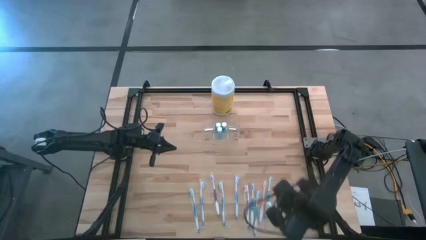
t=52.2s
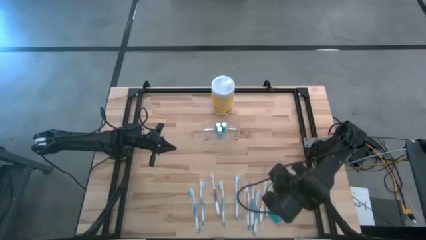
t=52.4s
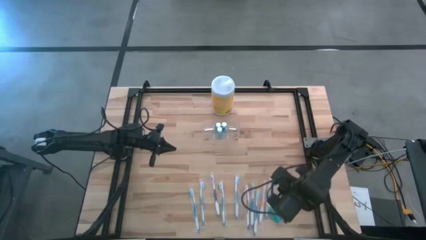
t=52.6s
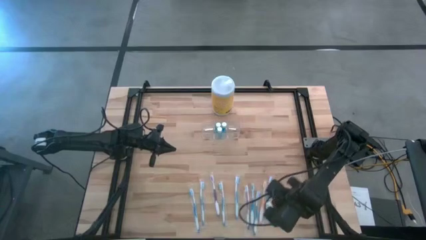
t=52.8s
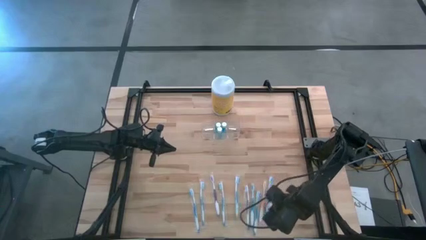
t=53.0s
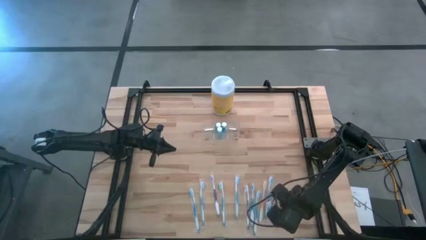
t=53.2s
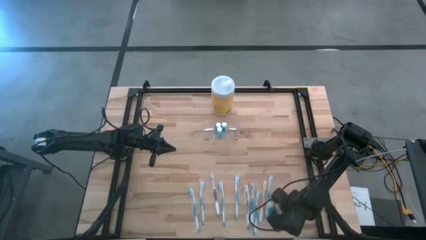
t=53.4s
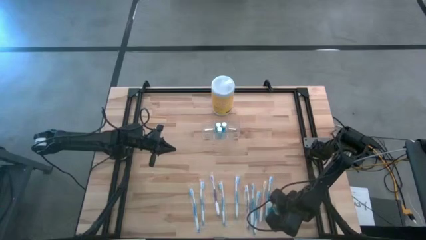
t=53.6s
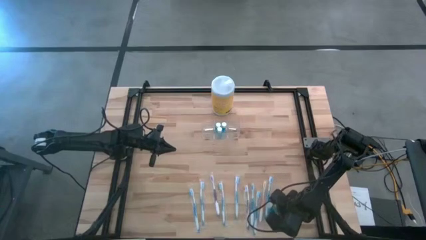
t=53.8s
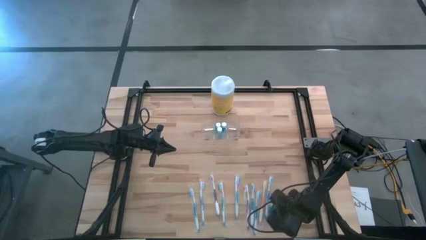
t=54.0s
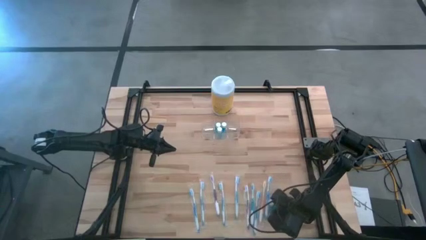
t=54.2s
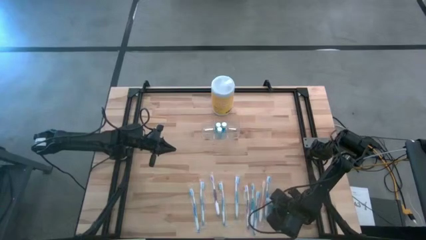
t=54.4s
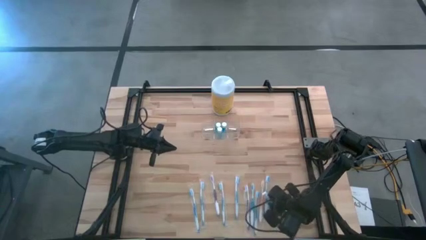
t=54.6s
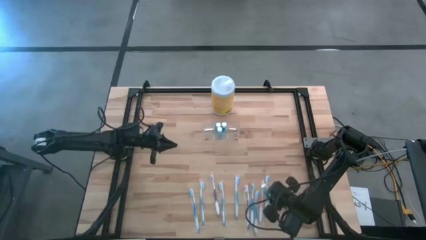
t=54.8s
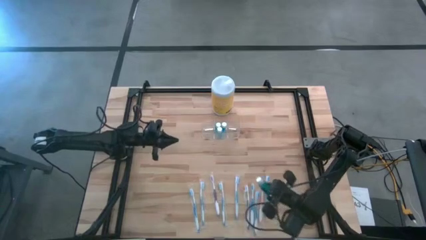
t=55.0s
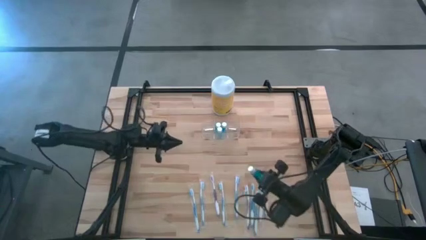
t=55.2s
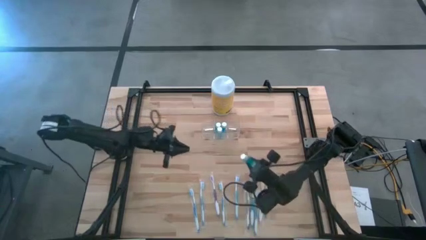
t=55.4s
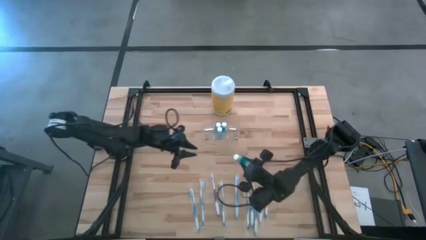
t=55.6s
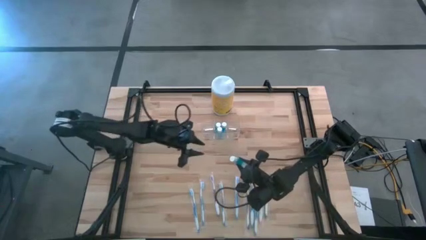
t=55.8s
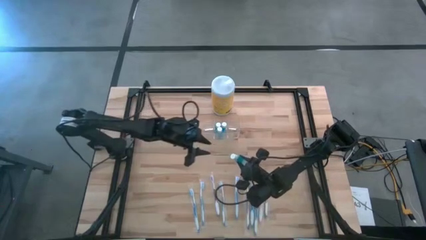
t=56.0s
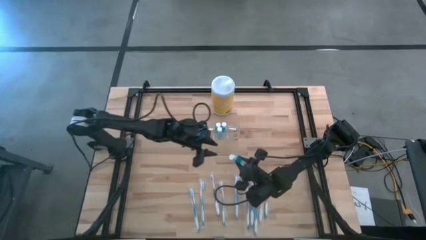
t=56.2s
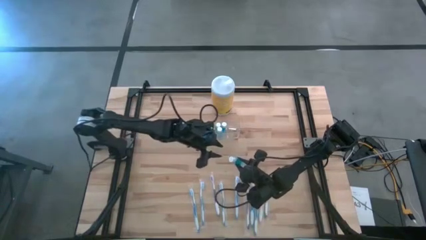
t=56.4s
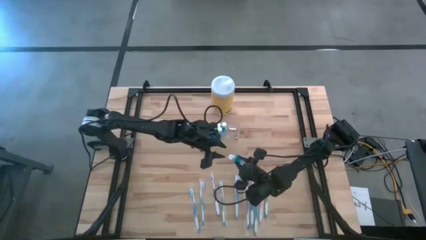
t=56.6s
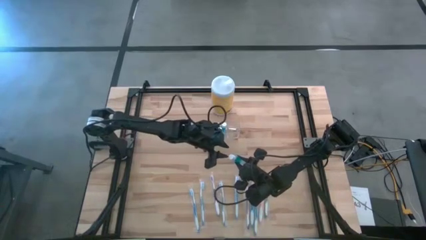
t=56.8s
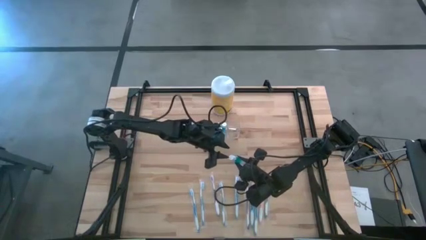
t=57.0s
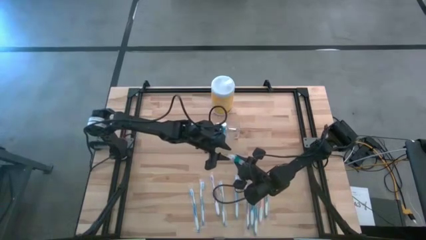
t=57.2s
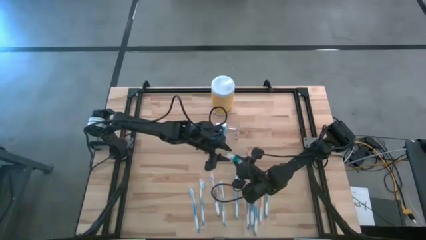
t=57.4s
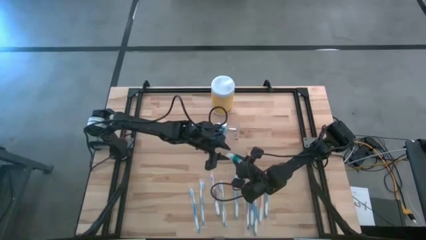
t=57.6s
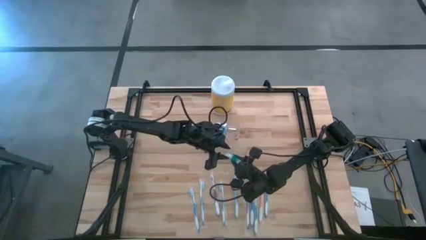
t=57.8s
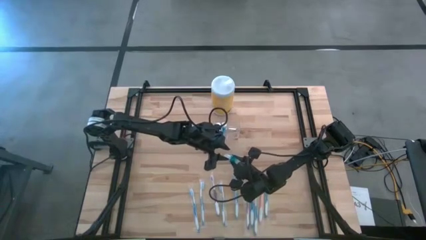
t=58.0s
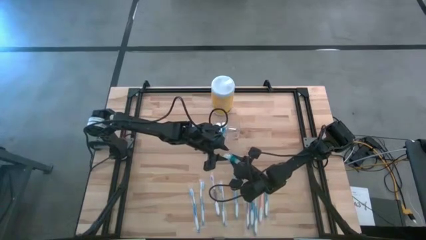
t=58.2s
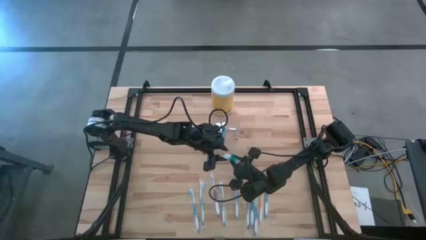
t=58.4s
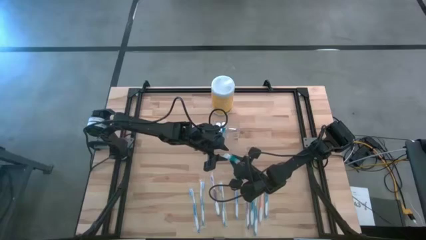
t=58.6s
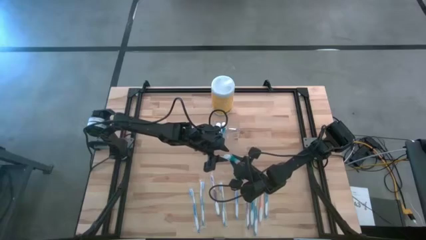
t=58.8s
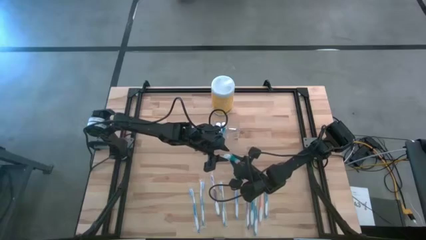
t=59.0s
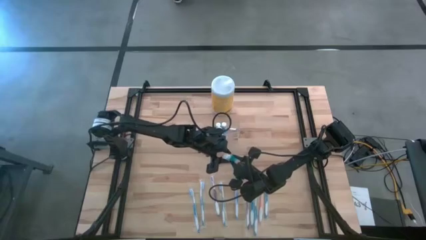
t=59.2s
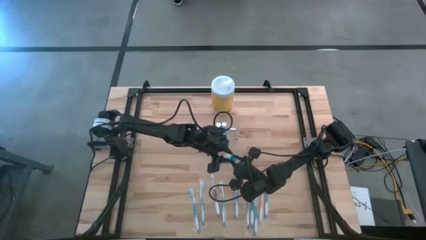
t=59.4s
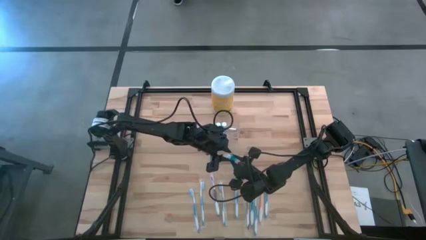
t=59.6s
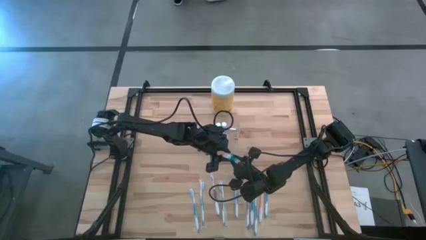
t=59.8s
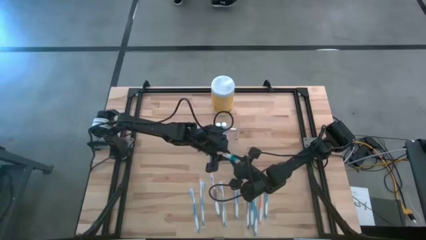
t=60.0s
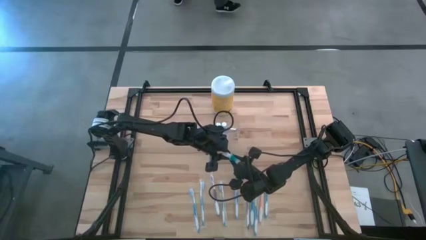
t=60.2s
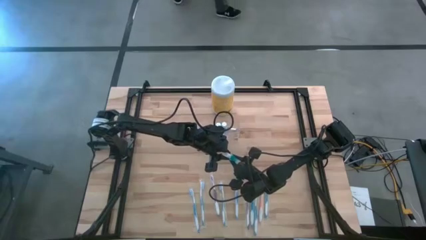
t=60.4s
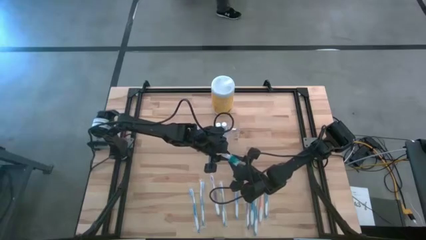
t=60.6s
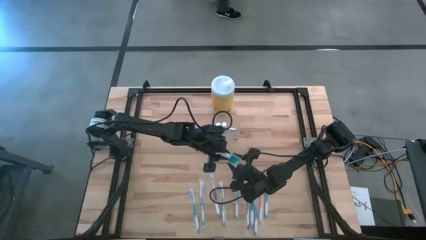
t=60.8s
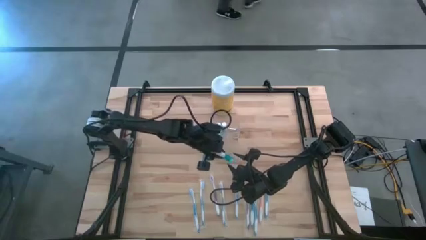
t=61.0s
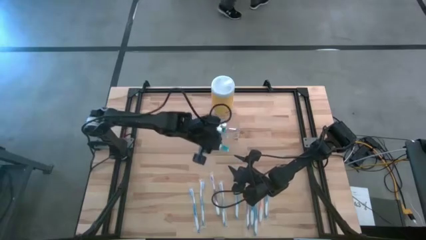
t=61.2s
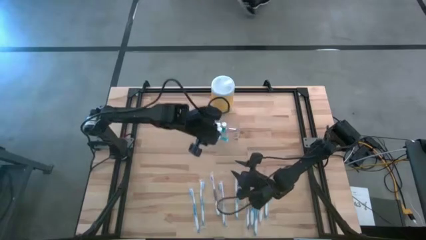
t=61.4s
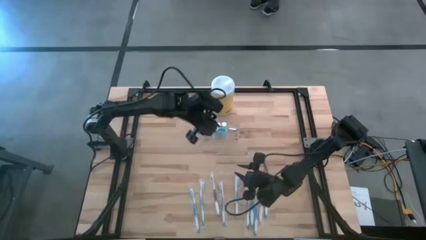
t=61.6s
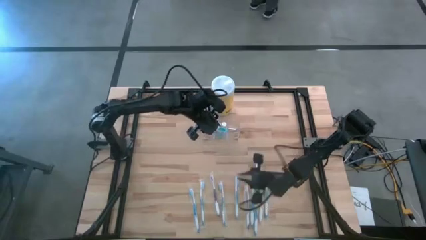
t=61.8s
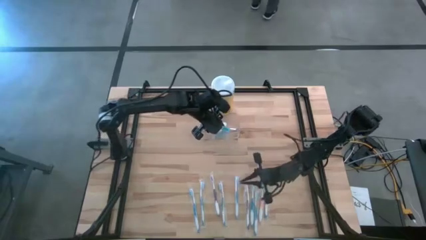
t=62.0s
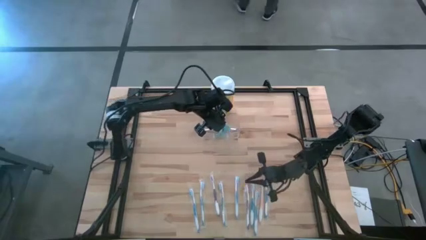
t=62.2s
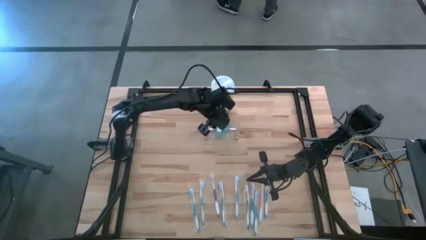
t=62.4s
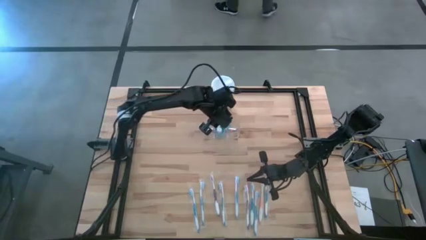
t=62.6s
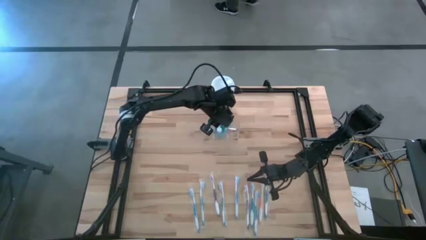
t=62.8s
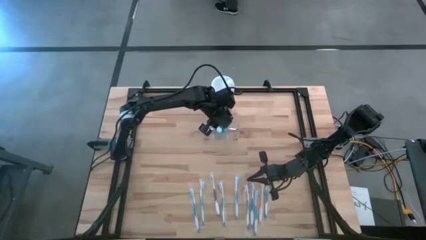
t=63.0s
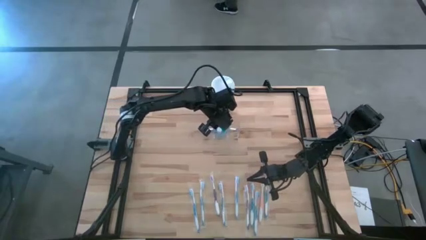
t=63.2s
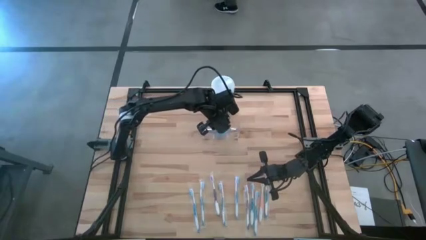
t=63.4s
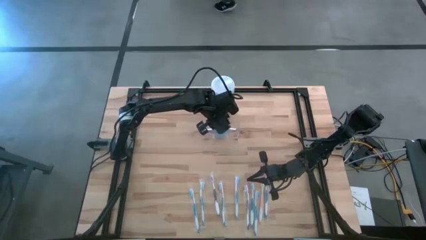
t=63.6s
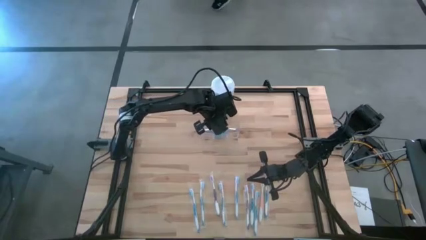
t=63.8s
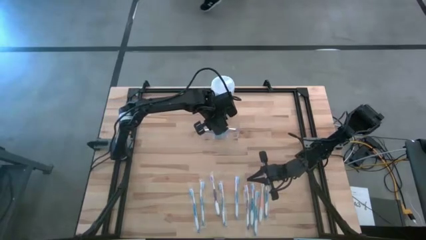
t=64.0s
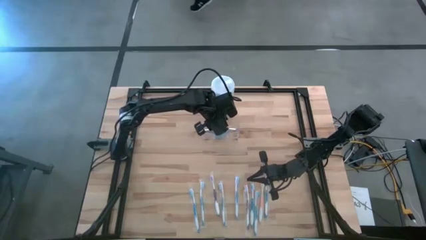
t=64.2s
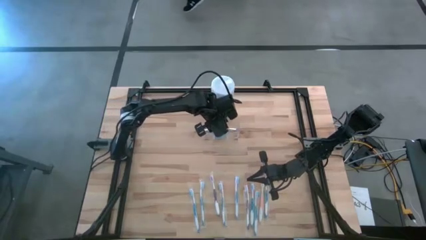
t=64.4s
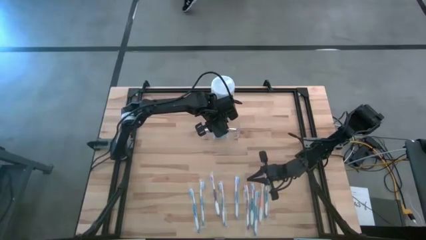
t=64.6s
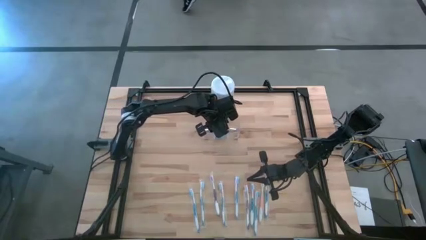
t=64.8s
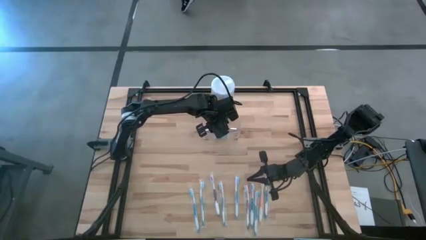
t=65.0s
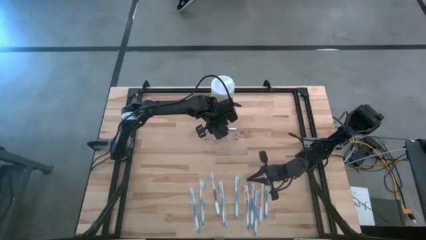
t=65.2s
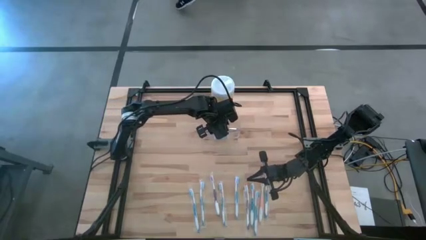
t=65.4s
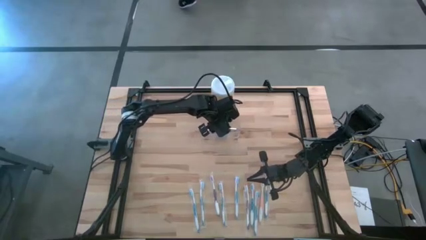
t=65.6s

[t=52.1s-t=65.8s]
Task: Pick & Place toothbrushing station
Put the blue mouthwash into the transparent organizer

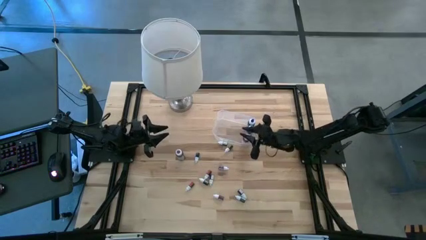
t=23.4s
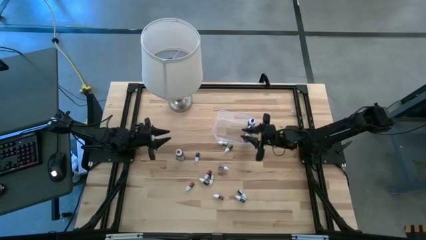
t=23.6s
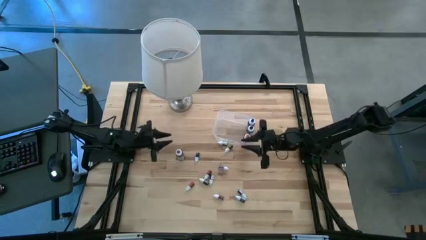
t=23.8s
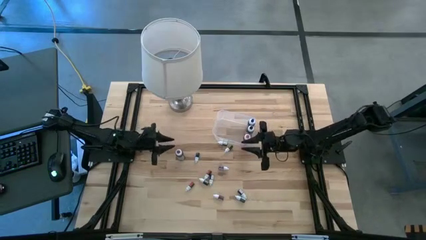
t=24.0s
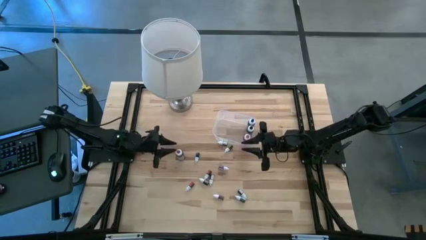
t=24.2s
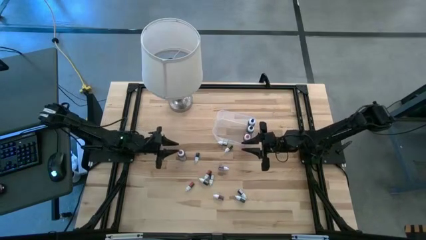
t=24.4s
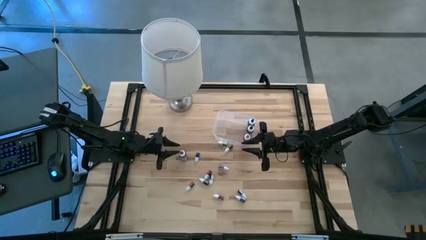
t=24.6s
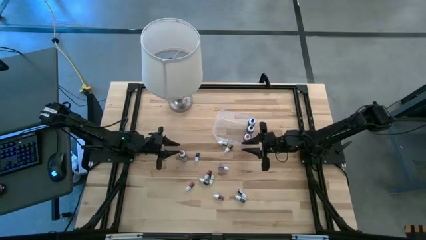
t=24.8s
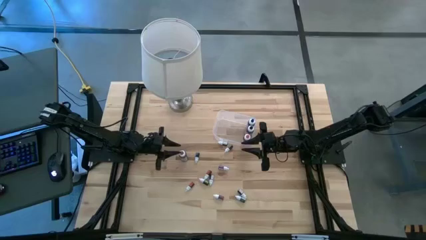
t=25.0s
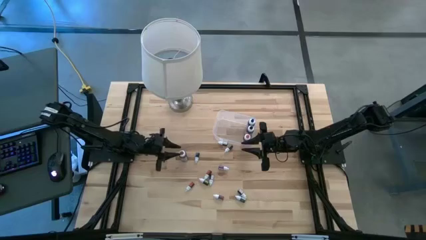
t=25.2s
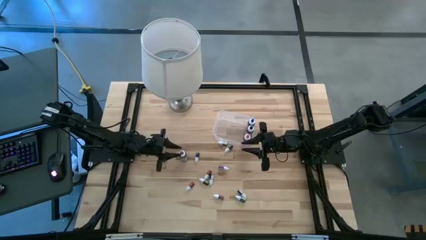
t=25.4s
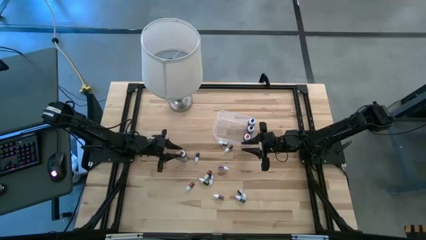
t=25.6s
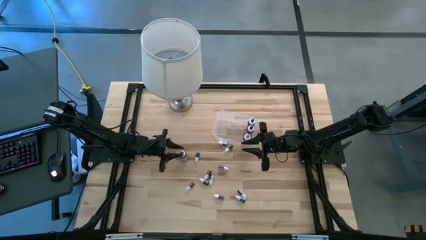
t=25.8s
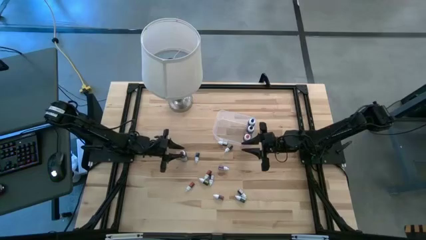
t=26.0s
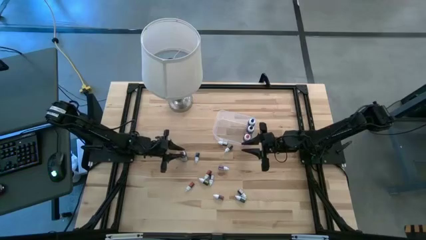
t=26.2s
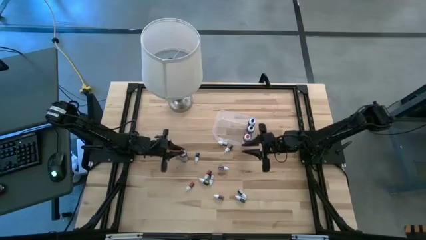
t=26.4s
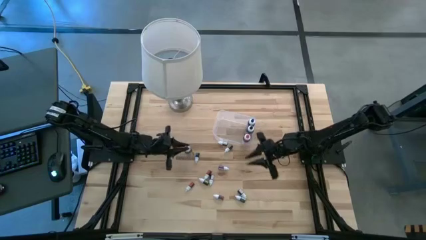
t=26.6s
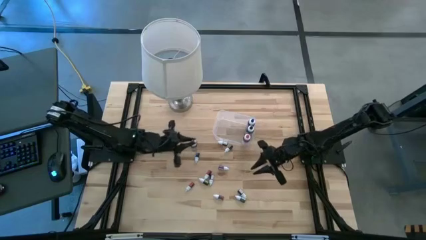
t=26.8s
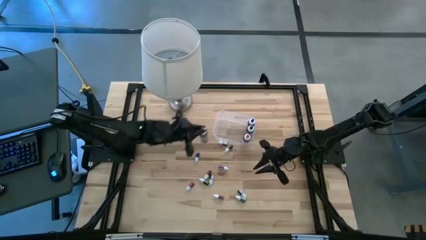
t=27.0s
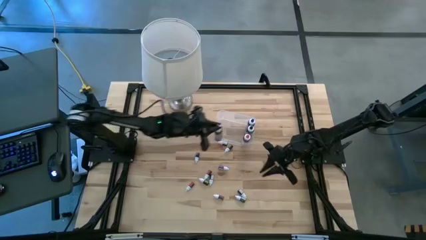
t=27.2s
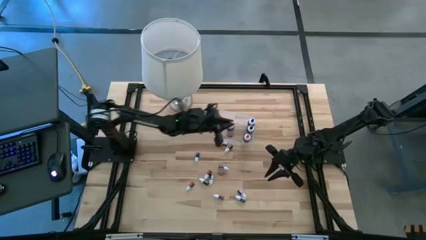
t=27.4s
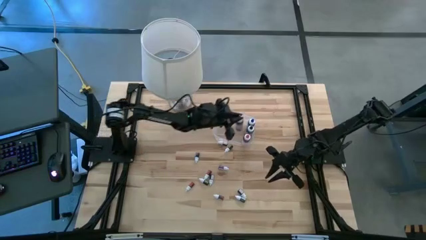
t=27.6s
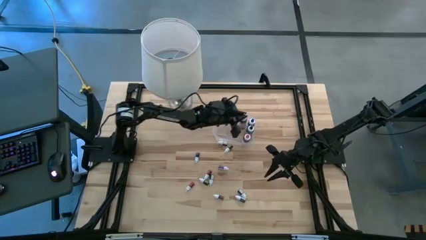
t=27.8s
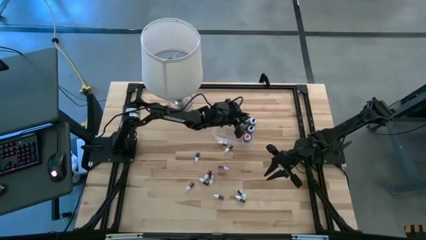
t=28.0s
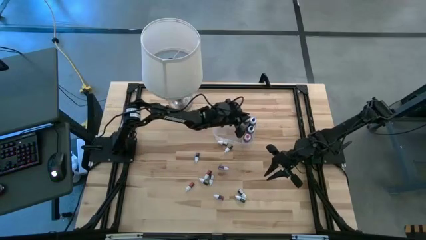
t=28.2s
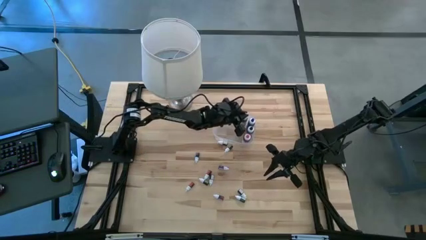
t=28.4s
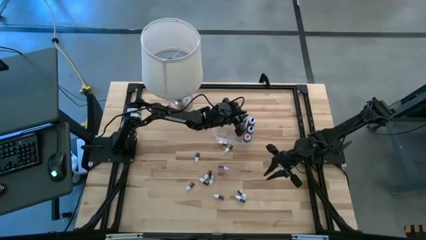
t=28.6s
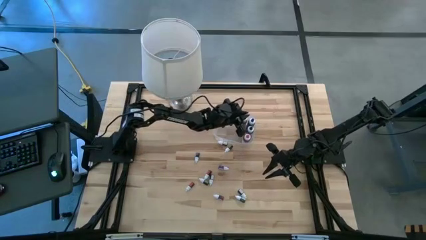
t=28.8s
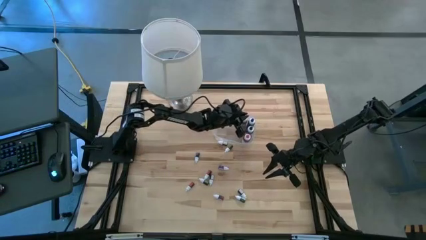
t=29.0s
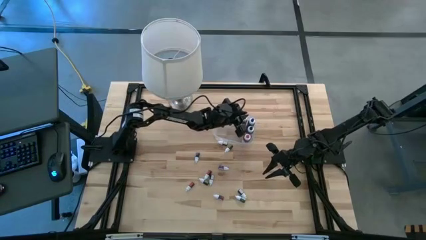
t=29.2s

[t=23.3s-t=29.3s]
Task: Pick & Place food coloring
Put the large purple food coloring bottle into the transparent bin
